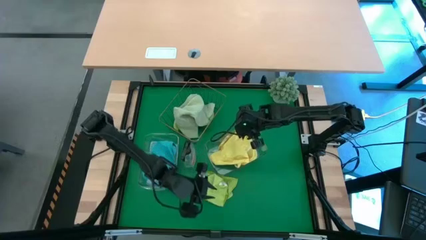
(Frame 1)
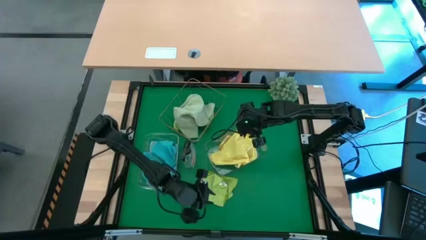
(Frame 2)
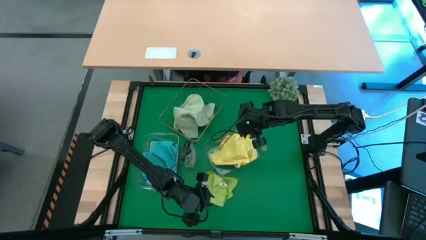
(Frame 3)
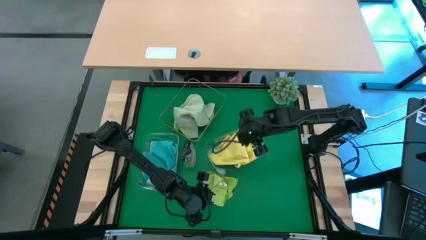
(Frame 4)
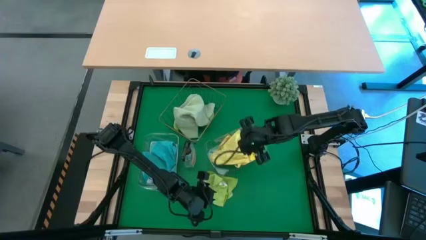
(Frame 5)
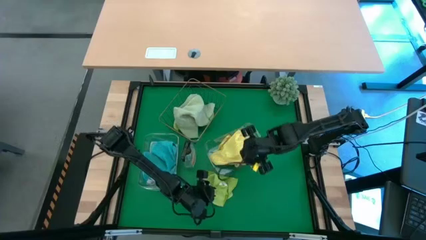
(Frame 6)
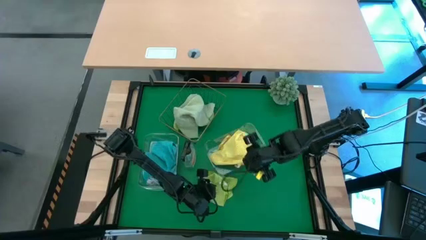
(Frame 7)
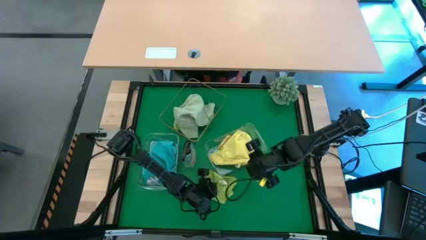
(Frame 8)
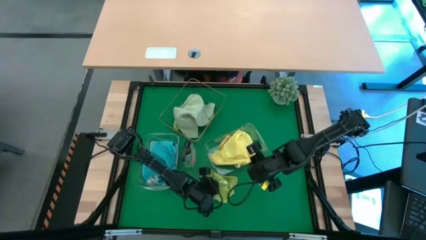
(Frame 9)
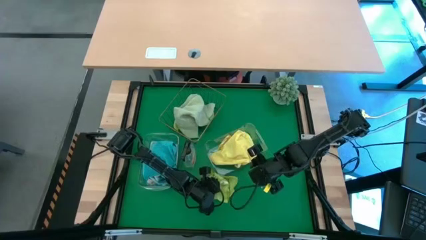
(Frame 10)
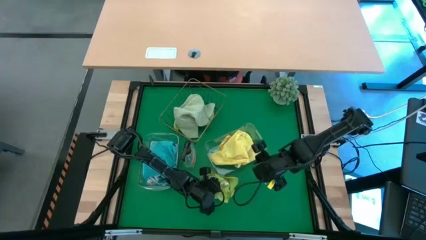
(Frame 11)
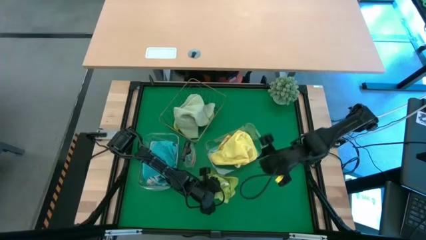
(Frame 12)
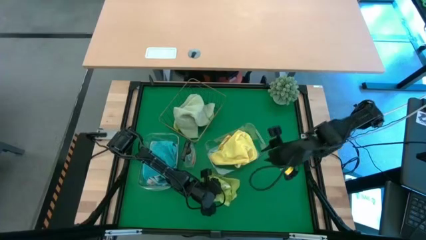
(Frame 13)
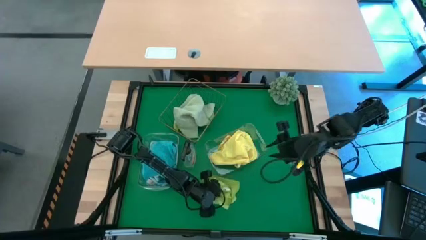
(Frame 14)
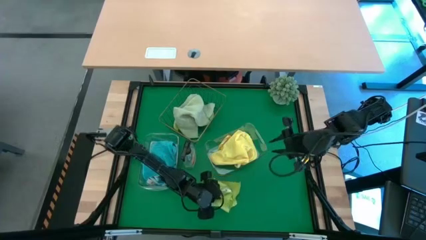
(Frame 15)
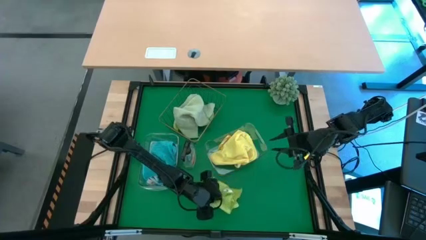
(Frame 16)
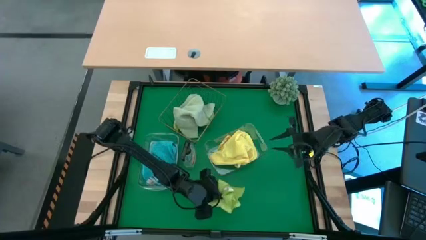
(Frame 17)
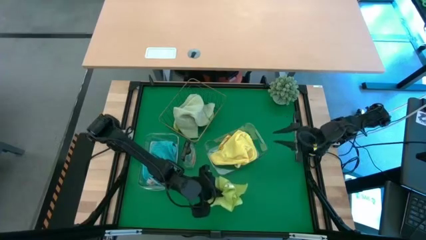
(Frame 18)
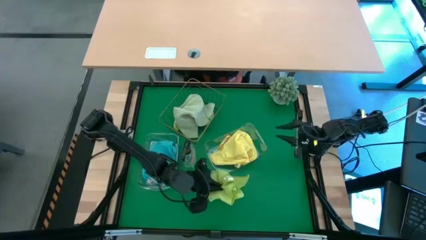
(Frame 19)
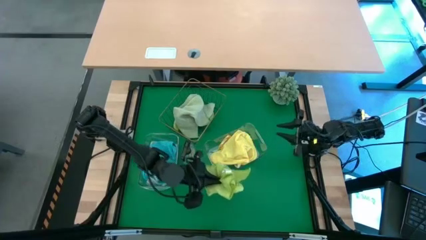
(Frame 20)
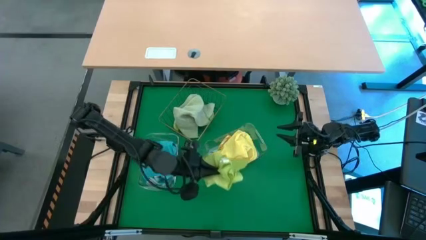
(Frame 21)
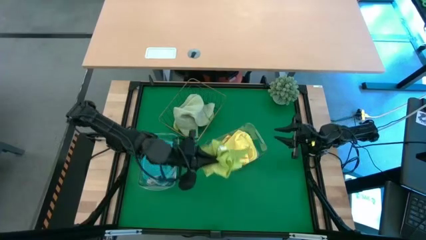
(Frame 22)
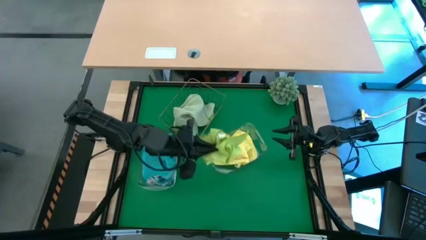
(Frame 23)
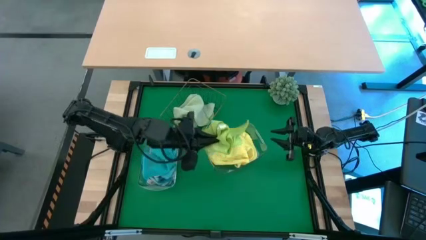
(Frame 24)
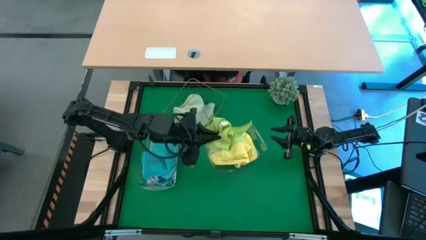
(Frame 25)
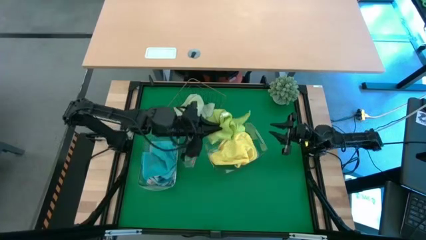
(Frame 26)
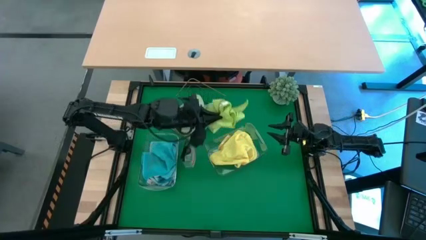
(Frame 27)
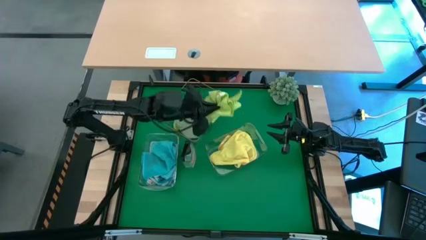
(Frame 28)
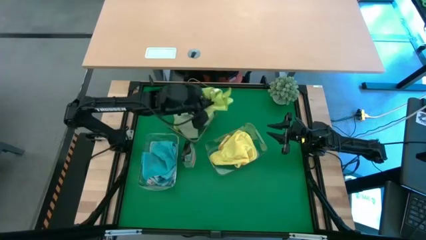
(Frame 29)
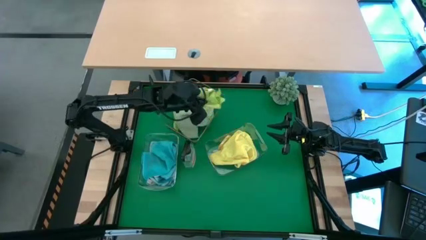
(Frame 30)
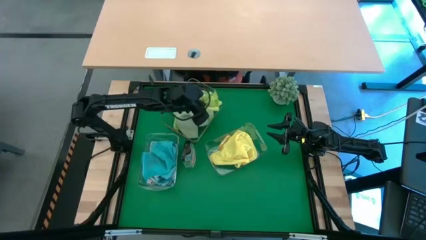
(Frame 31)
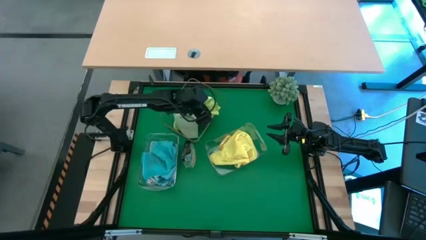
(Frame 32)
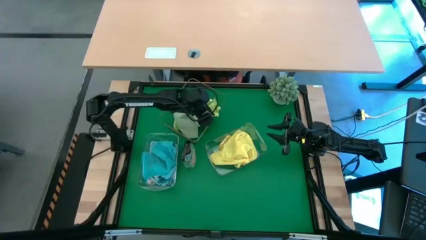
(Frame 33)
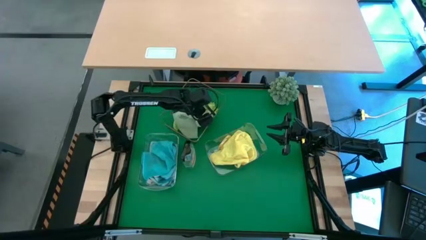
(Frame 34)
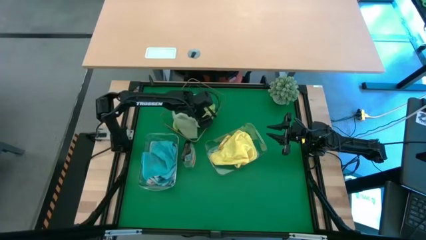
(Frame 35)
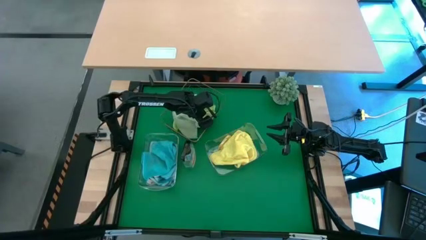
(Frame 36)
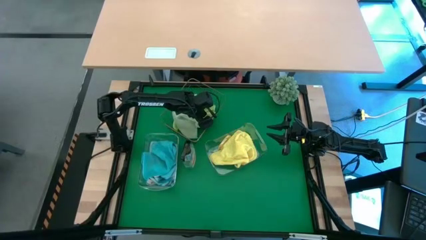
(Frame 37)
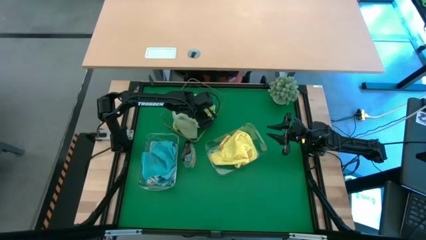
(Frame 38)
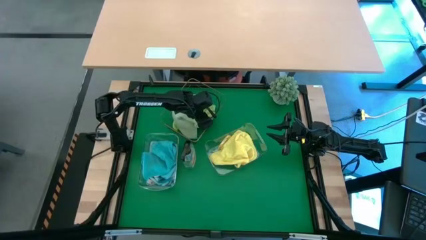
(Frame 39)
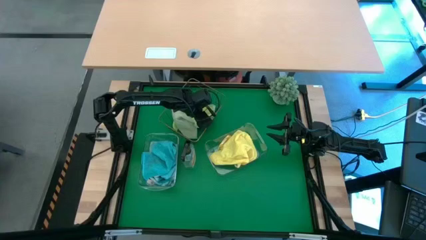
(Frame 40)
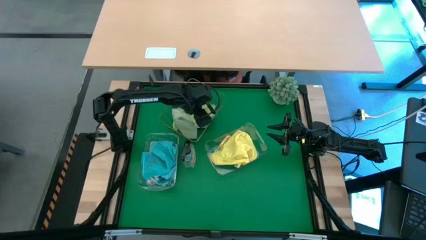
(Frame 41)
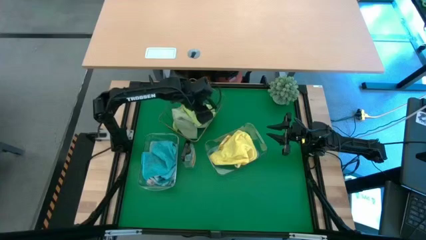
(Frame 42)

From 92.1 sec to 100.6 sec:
Task: Sort microfiber towel by color & place in baskets
Put the green microfiber towel into the wire basket

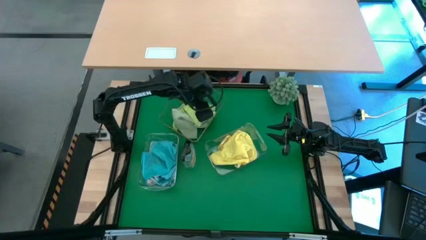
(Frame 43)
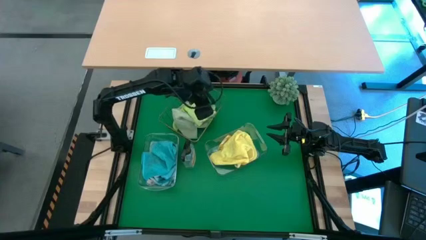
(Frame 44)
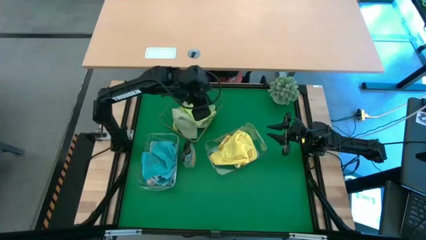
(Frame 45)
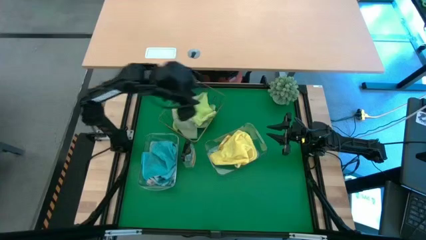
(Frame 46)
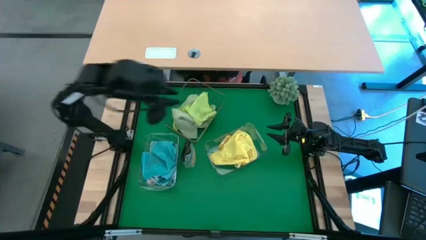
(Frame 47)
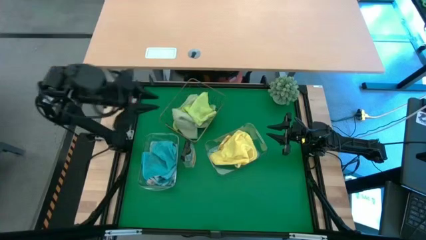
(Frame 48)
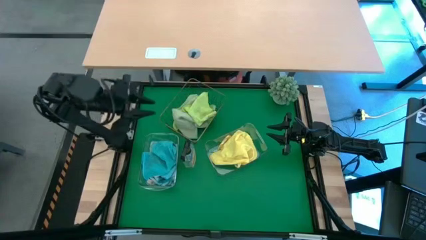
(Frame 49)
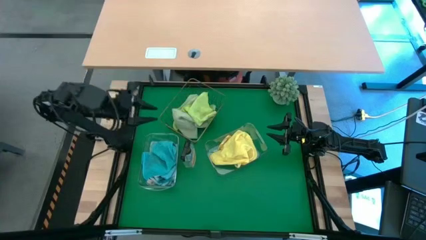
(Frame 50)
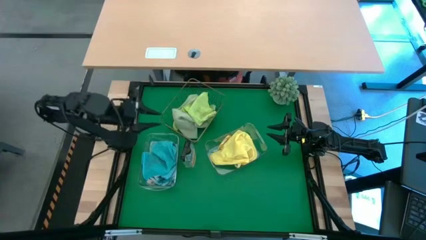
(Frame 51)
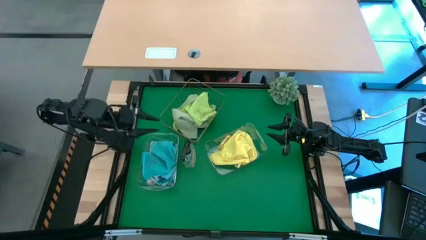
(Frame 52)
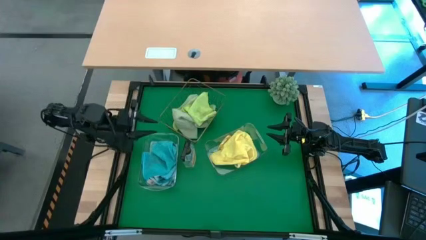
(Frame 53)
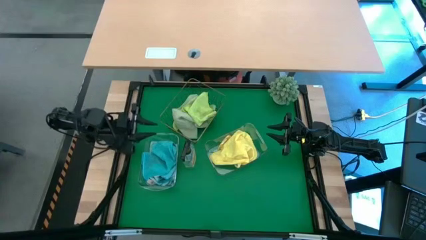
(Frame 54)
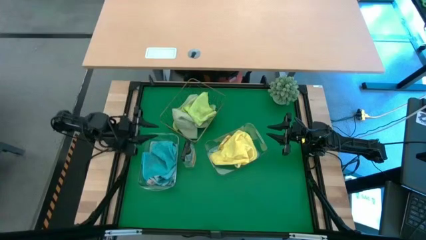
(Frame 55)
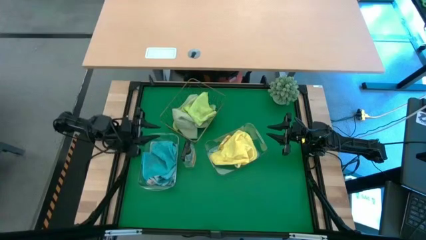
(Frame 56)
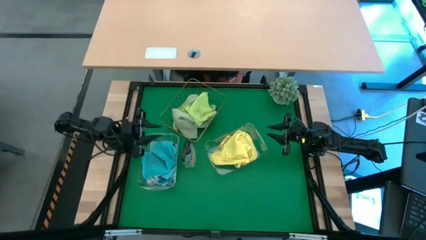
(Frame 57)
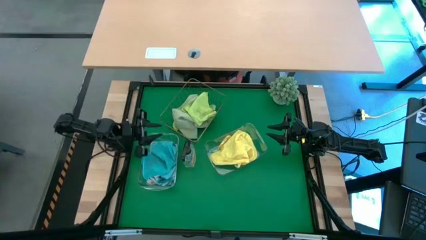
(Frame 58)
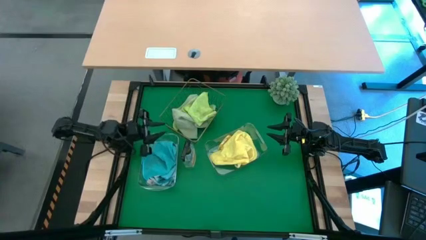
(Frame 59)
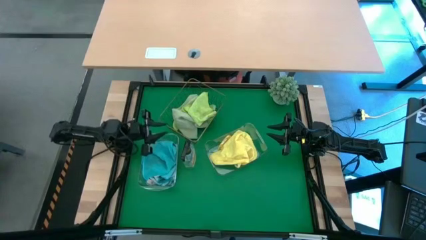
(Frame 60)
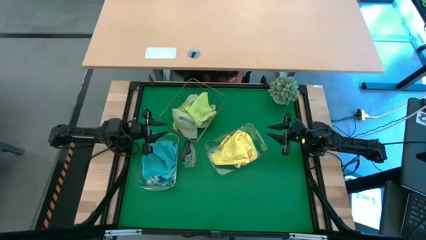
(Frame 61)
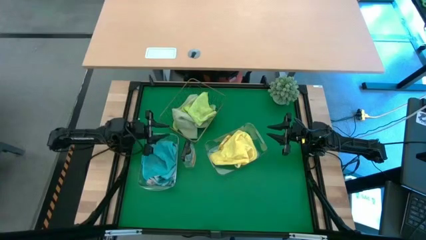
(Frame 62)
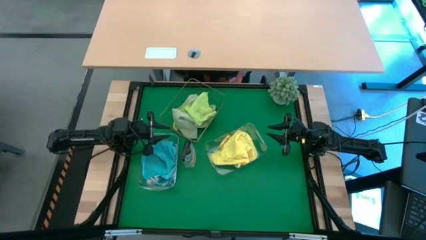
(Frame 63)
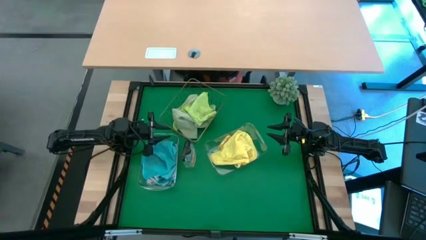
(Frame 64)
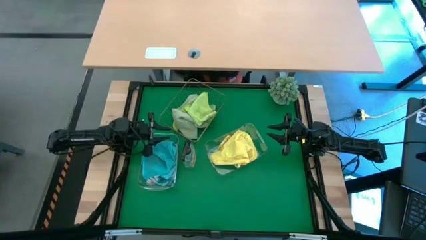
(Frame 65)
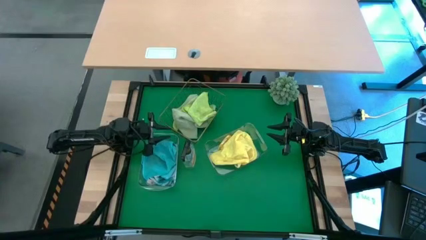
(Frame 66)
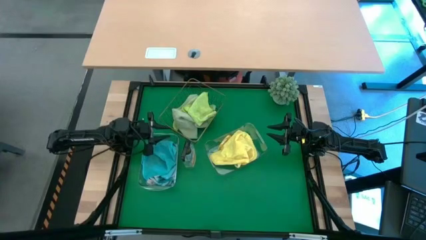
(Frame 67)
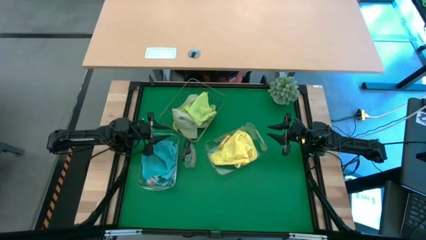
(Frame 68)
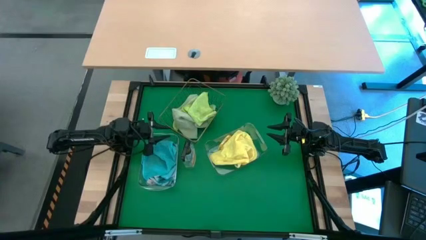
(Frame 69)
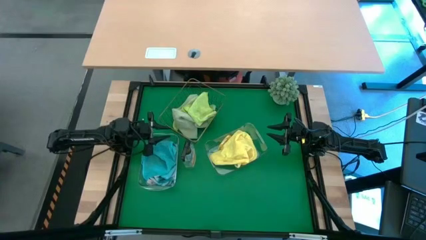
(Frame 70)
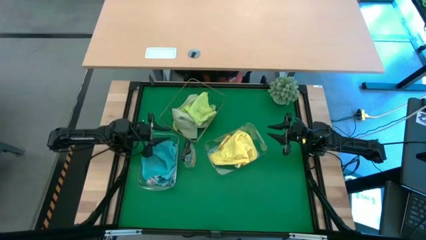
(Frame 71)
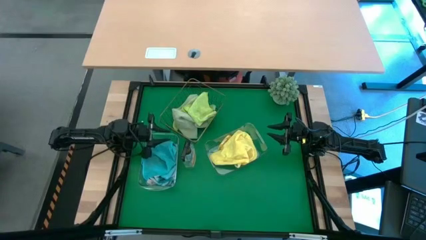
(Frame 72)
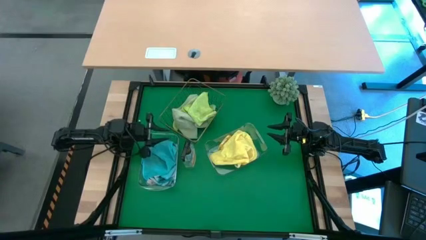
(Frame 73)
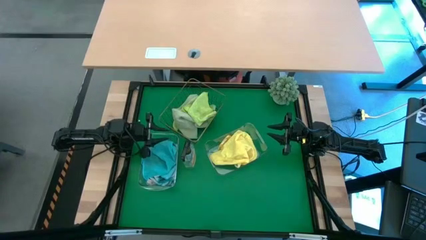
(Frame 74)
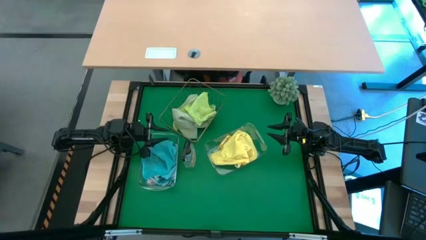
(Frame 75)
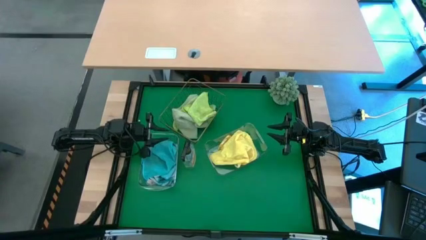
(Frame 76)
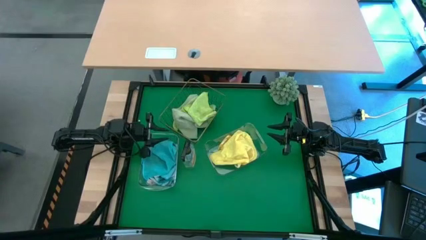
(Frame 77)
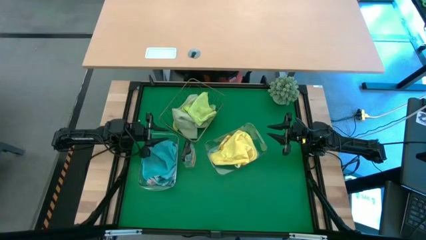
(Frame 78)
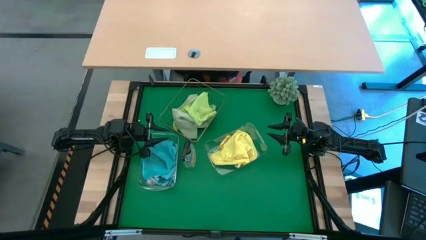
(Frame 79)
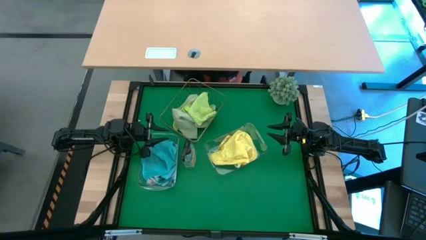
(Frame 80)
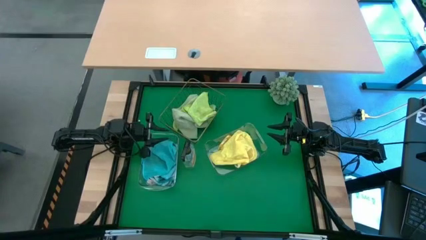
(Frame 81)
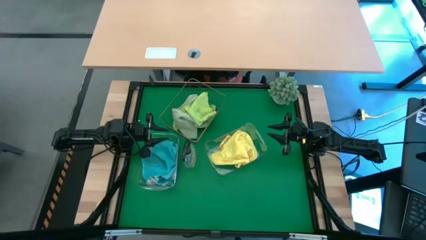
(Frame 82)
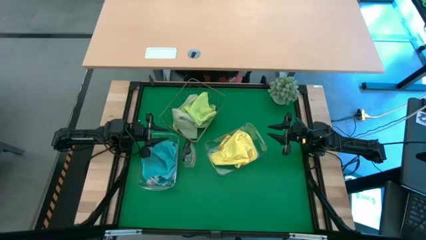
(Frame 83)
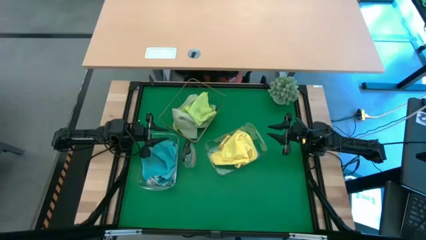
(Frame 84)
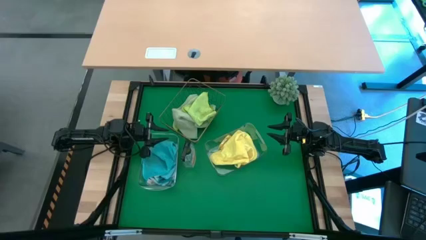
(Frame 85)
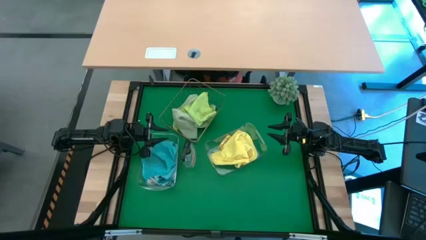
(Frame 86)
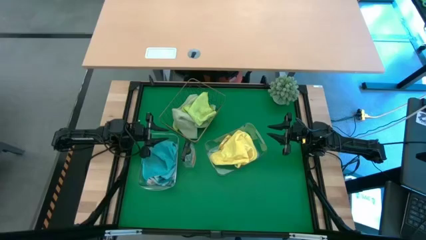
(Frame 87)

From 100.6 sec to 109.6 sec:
Return to Home Position
